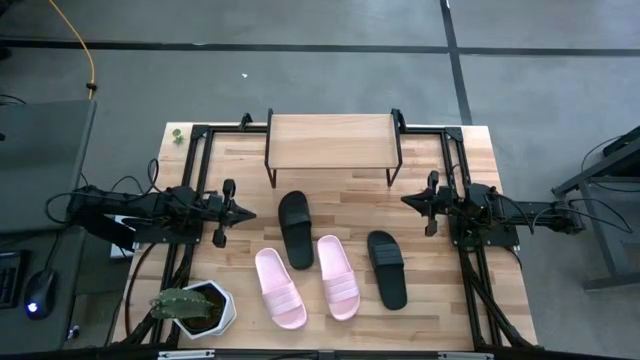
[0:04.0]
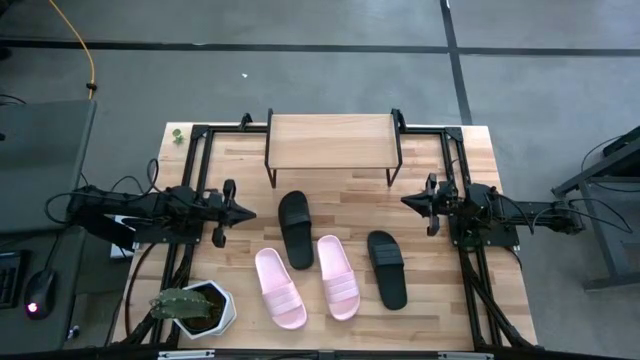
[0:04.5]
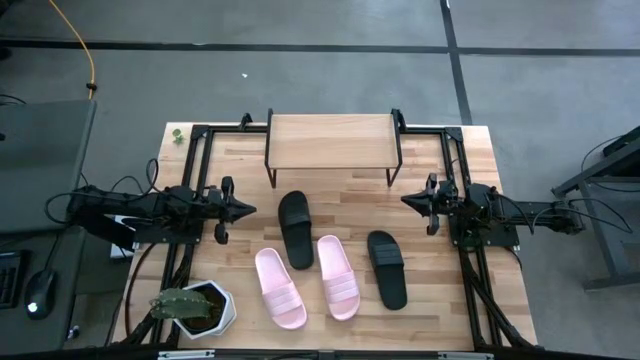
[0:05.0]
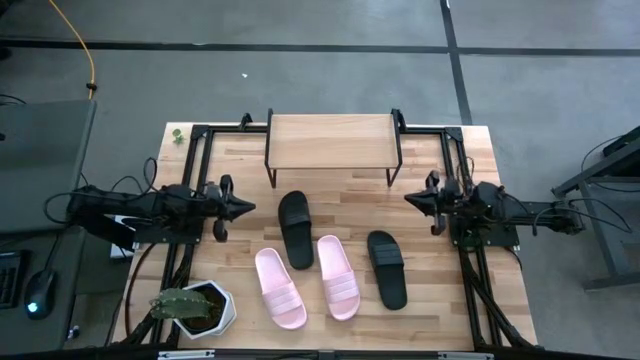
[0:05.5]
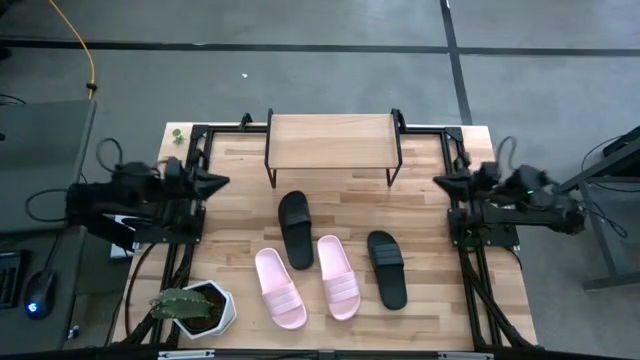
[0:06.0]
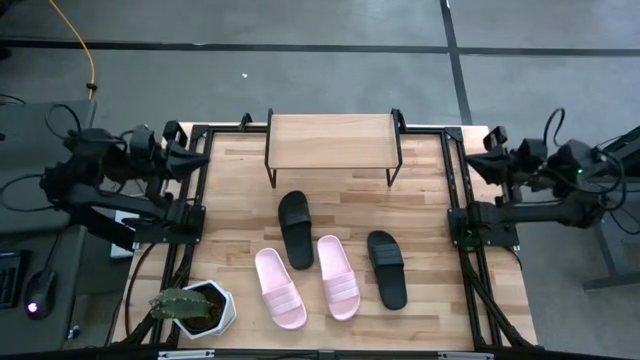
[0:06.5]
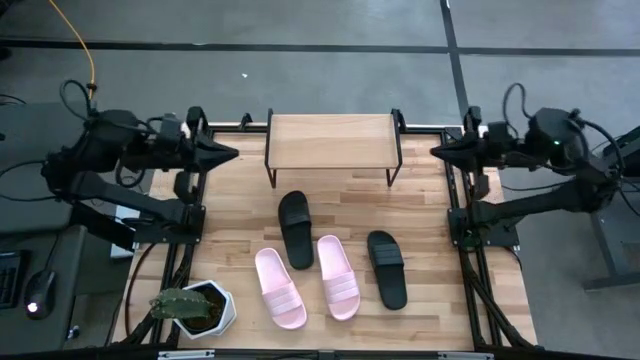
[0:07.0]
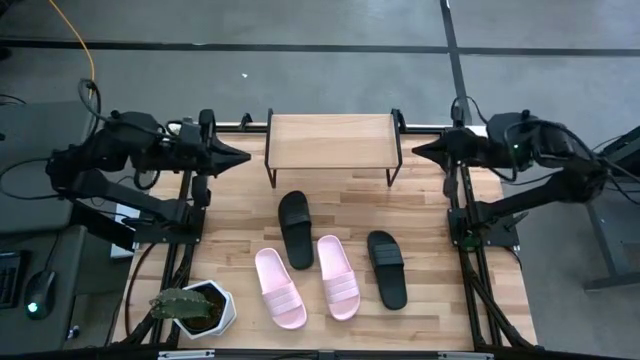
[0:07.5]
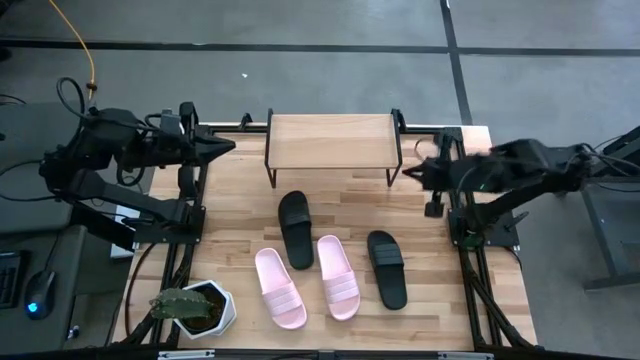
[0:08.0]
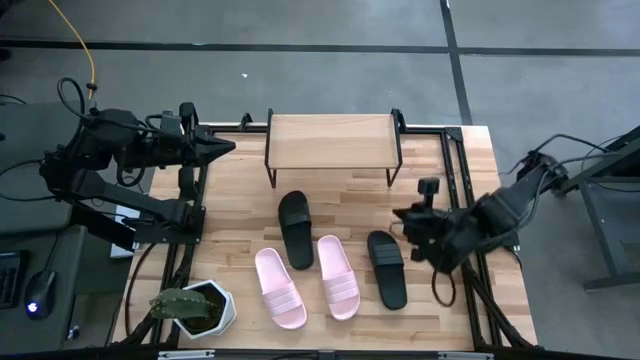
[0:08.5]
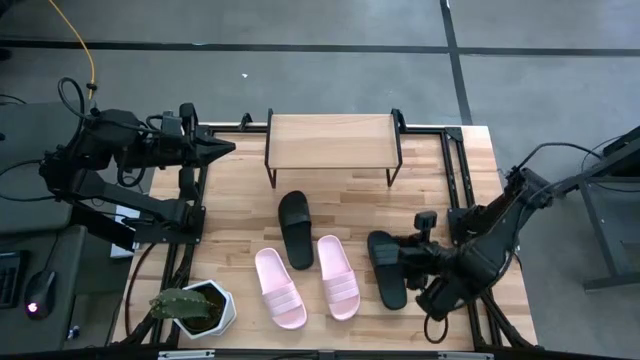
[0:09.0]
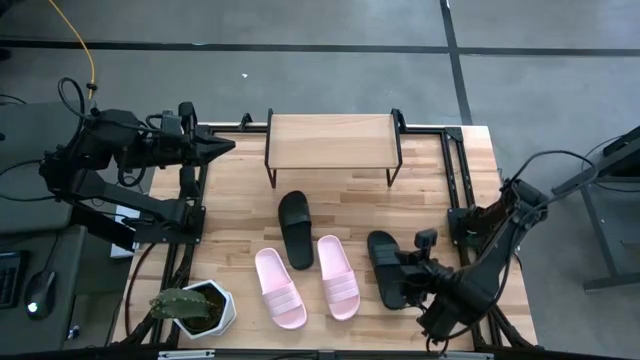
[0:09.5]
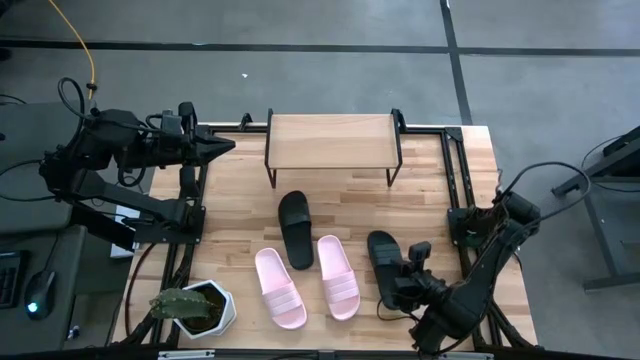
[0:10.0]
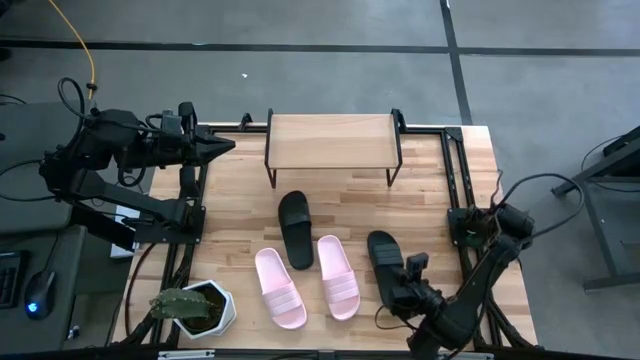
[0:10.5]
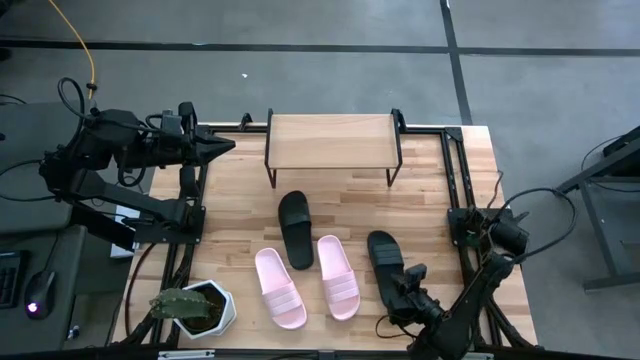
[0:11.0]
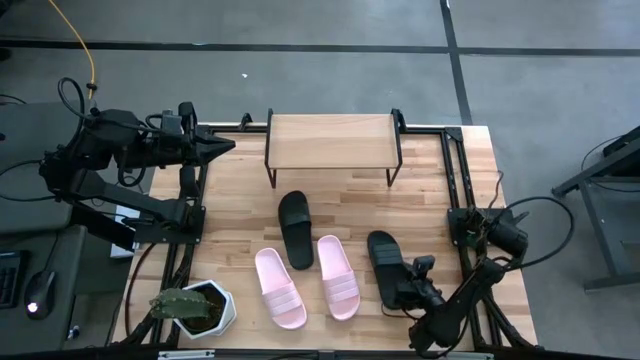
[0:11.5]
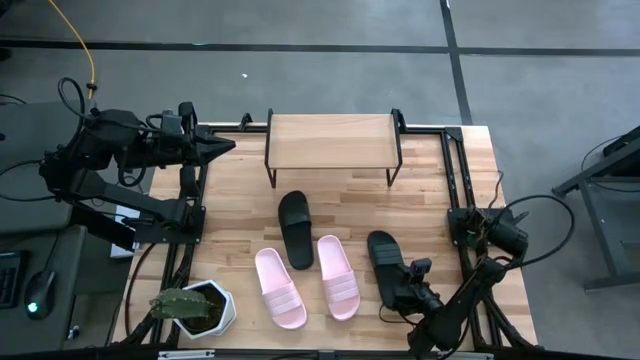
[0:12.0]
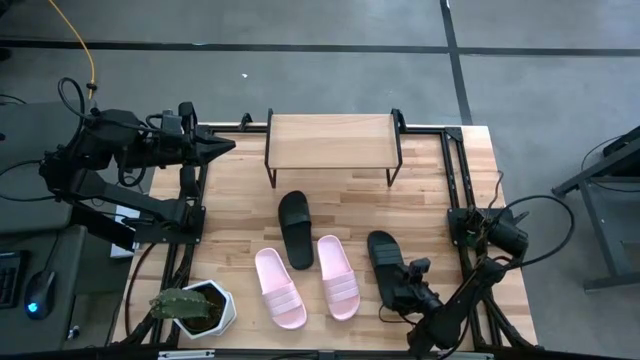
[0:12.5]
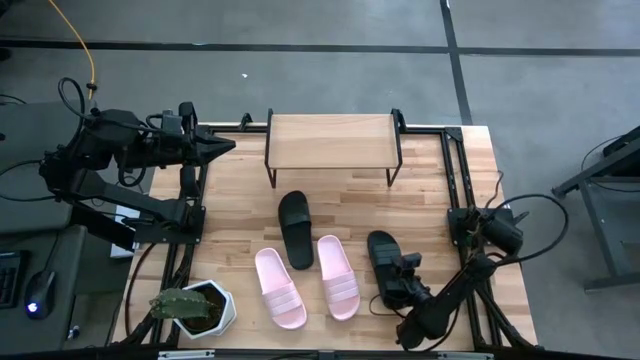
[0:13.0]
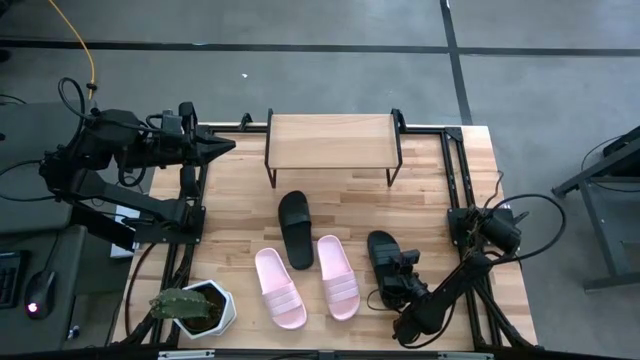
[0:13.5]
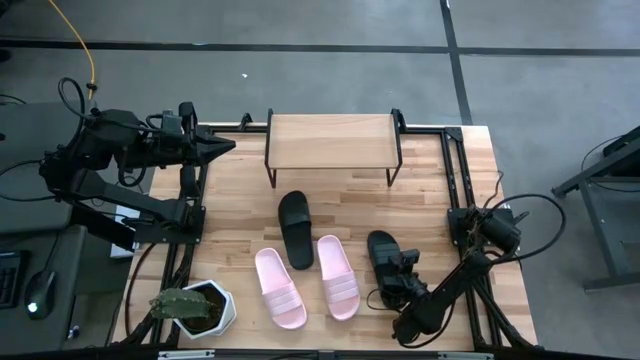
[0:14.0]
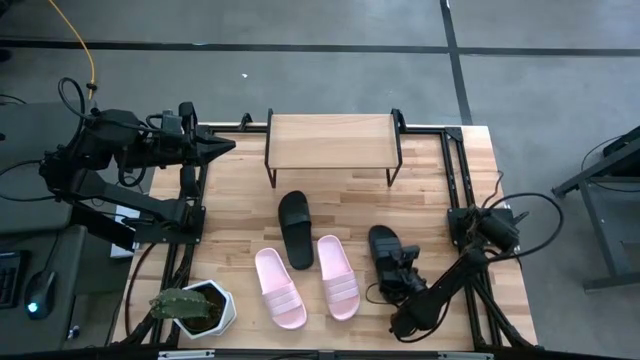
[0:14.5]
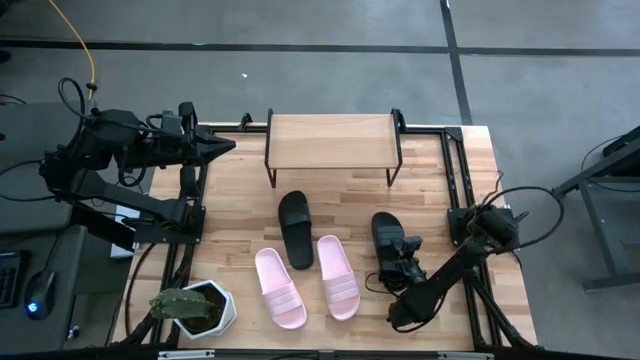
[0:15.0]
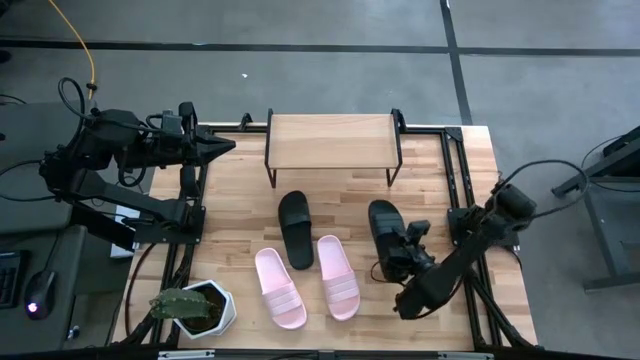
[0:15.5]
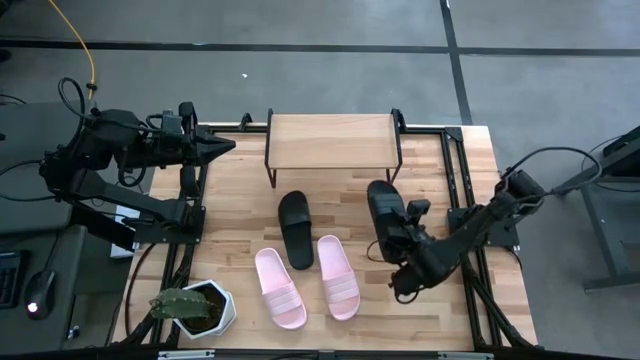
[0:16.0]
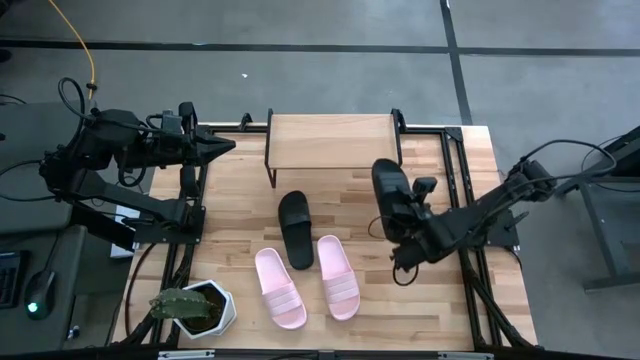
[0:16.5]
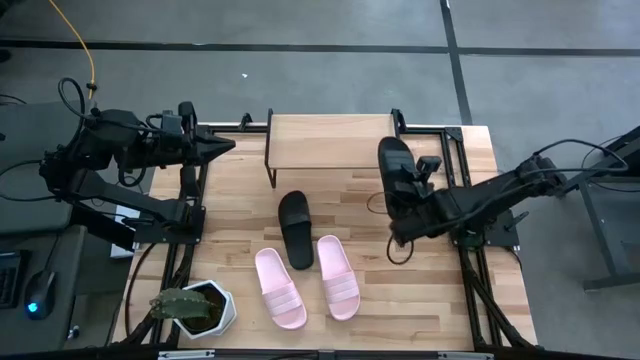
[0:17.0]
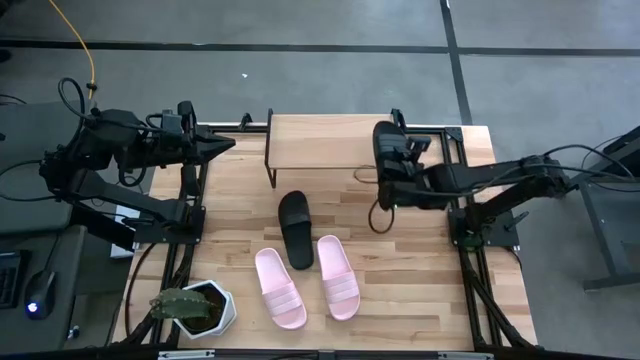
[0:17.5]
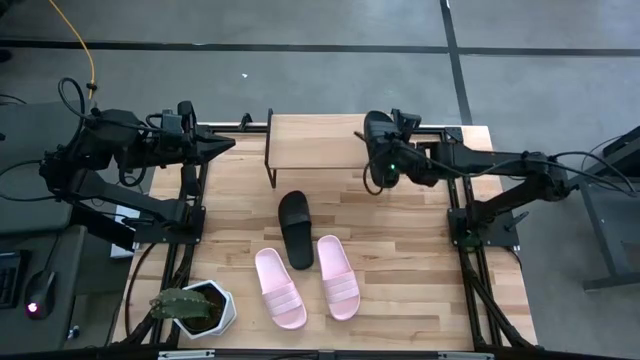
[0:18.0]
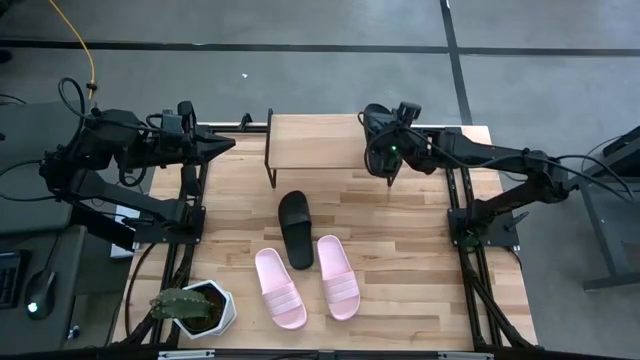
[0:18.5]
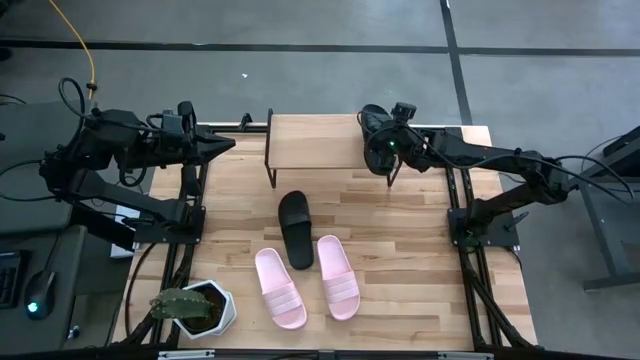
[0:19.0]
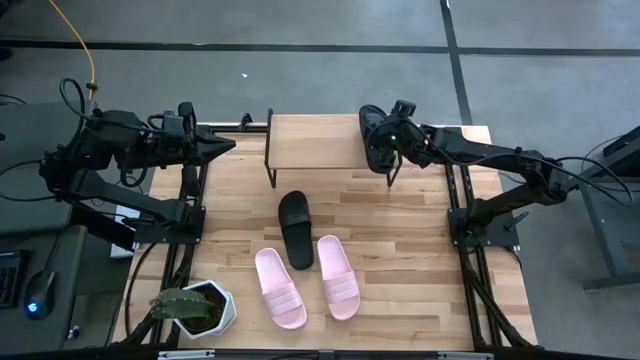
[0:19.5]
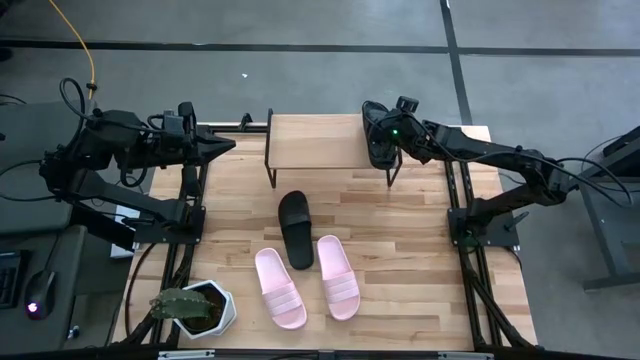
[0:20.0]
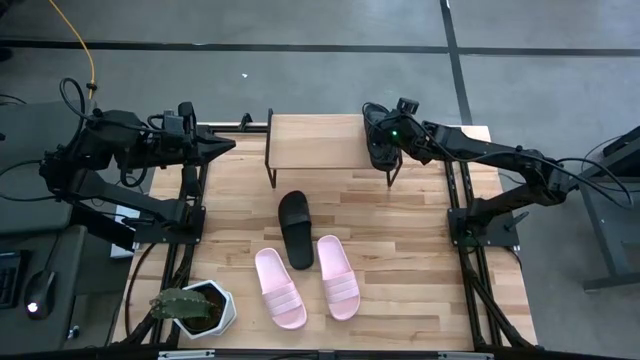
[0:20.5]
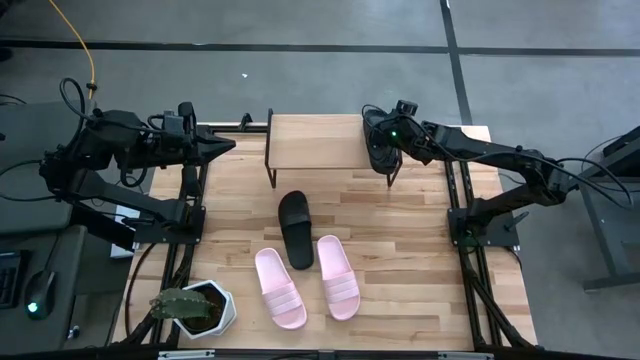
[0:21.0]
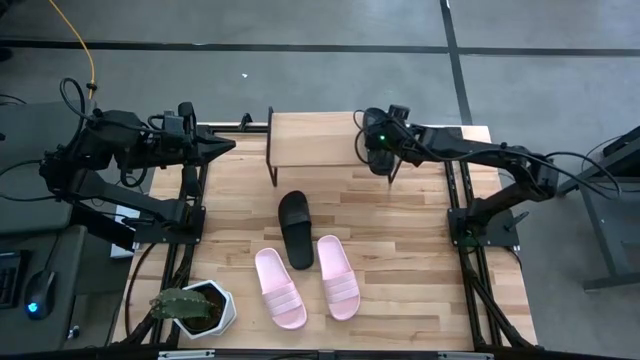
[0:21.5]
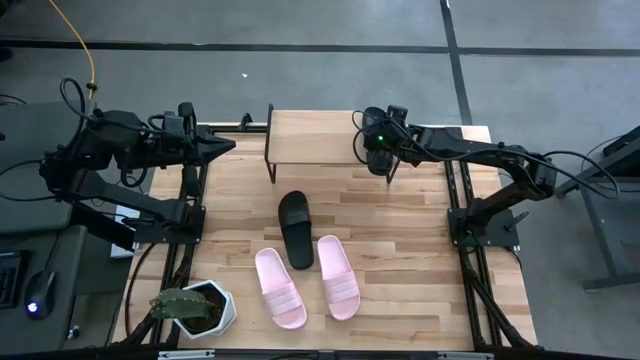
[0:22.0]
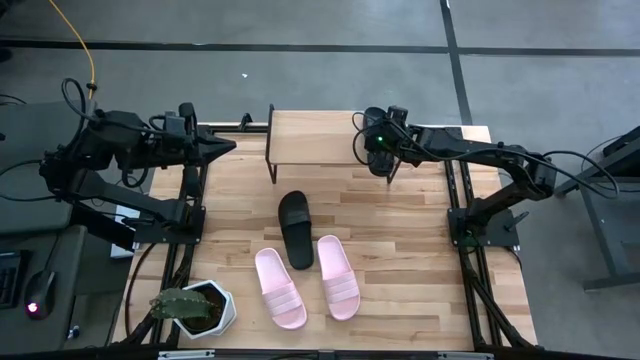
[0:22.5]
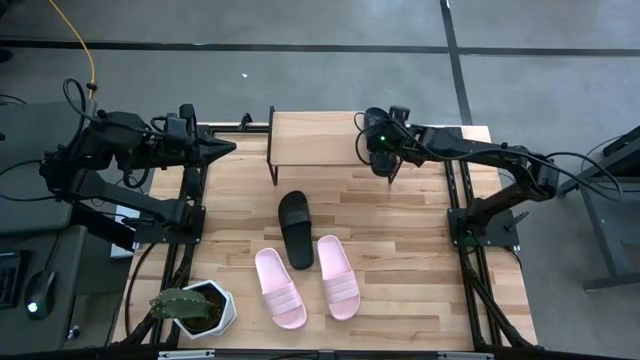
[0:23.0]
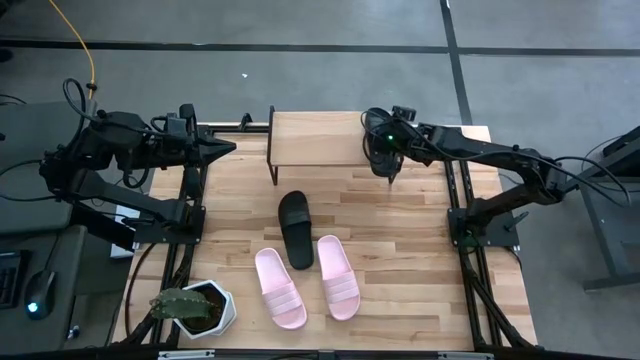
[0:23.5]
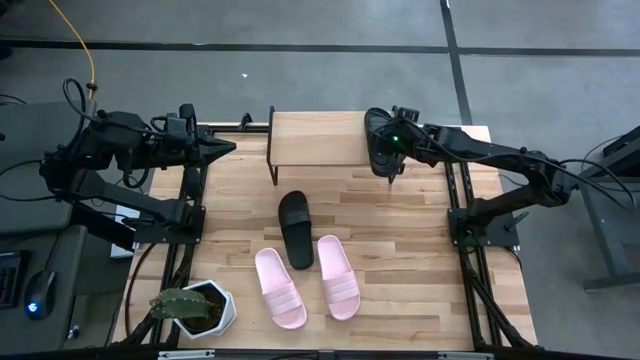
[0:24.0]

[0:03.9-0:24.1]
Task: Pick and place slides into the shelf
Put the right black slide on the shelf
